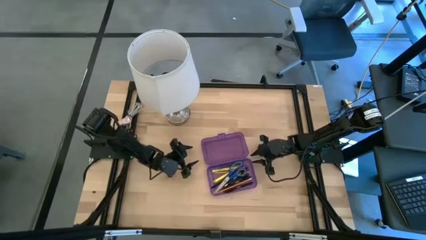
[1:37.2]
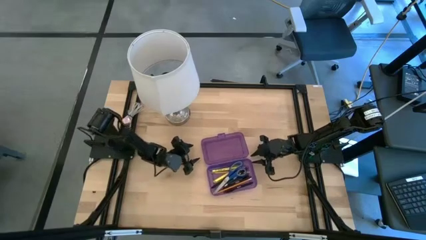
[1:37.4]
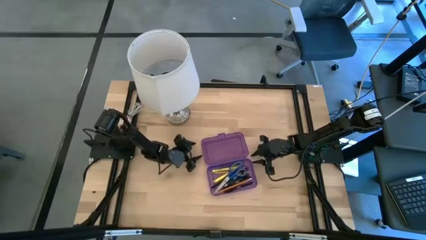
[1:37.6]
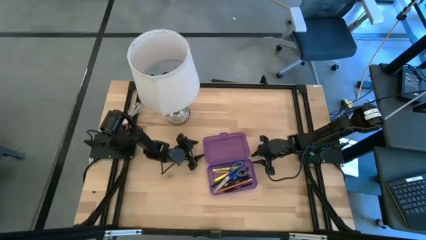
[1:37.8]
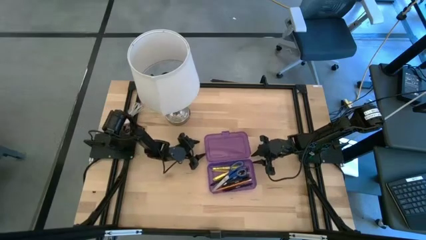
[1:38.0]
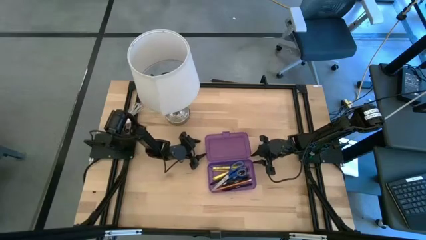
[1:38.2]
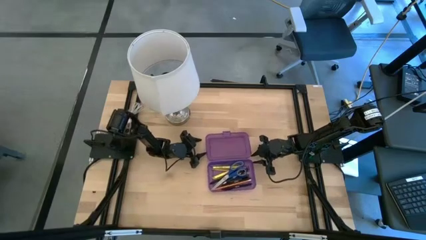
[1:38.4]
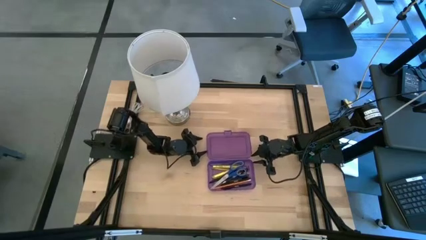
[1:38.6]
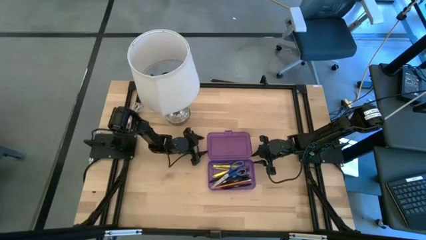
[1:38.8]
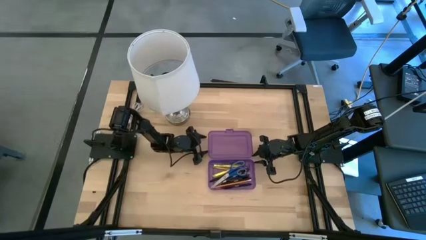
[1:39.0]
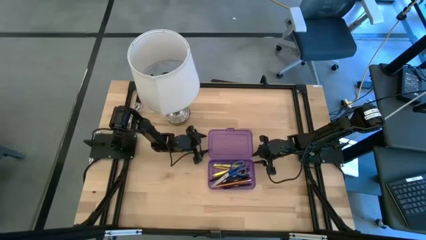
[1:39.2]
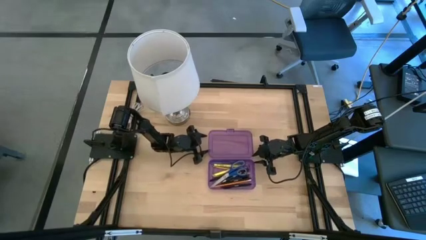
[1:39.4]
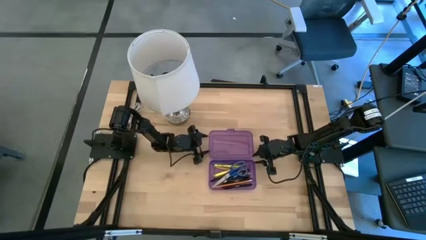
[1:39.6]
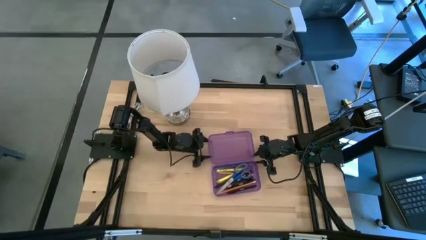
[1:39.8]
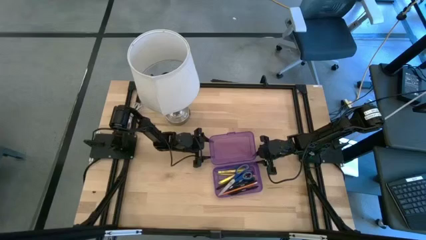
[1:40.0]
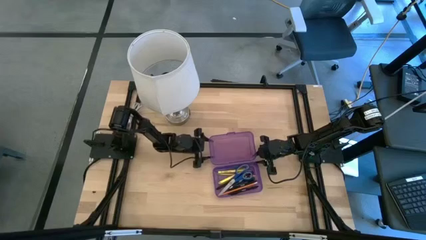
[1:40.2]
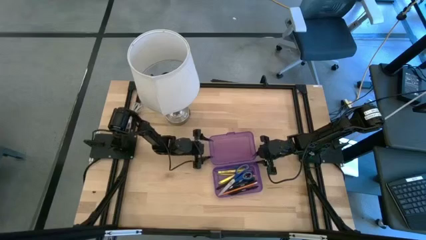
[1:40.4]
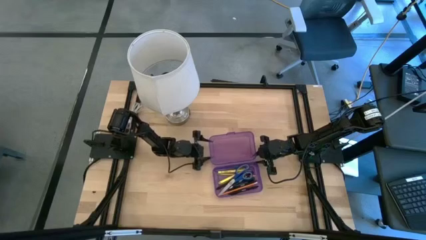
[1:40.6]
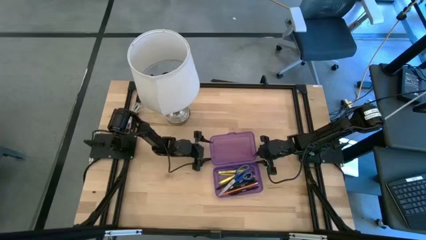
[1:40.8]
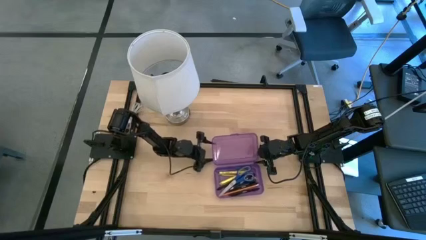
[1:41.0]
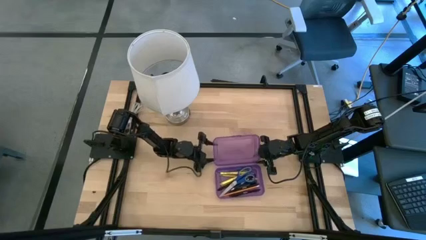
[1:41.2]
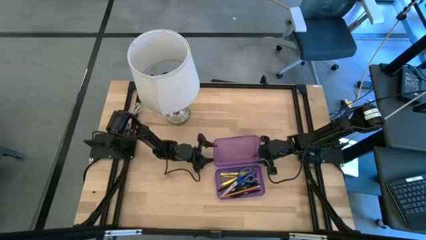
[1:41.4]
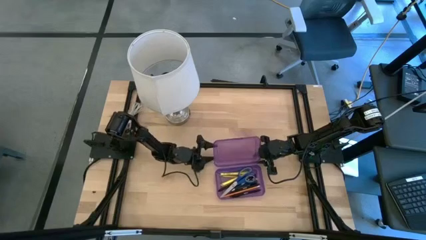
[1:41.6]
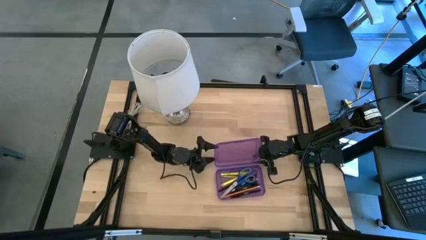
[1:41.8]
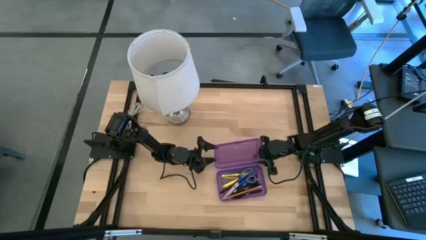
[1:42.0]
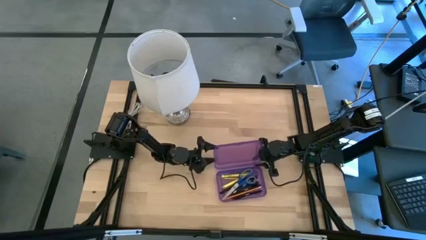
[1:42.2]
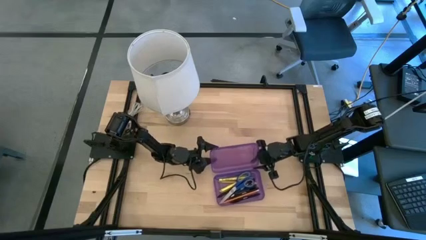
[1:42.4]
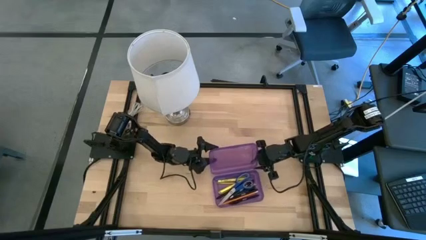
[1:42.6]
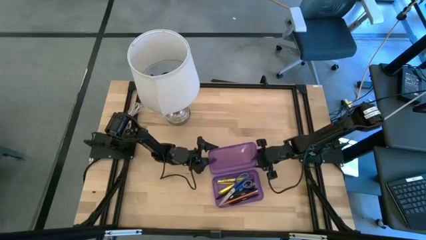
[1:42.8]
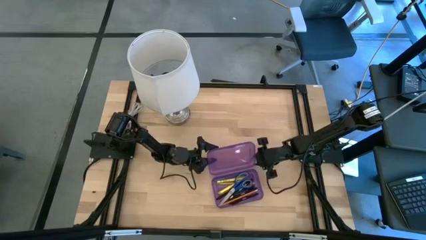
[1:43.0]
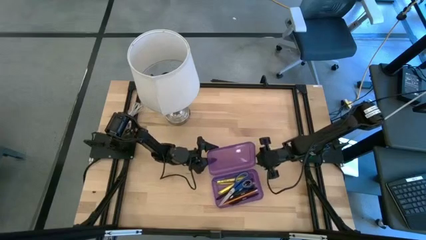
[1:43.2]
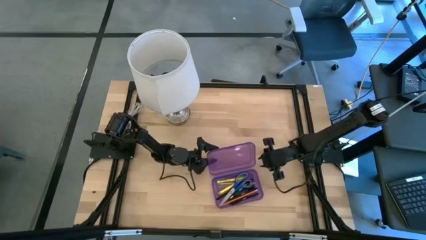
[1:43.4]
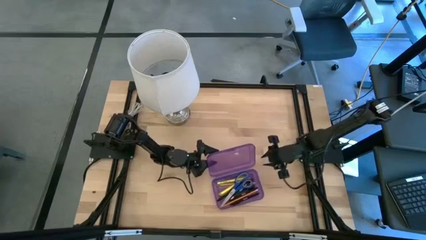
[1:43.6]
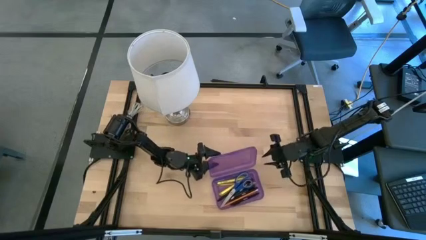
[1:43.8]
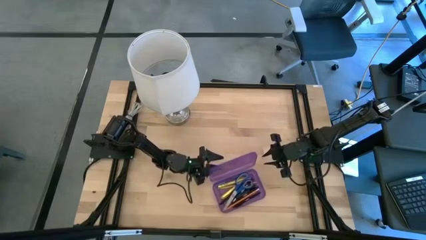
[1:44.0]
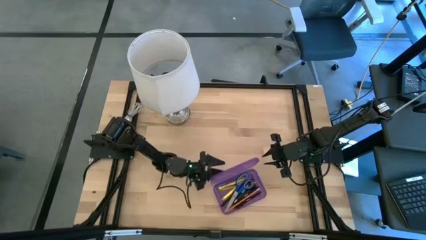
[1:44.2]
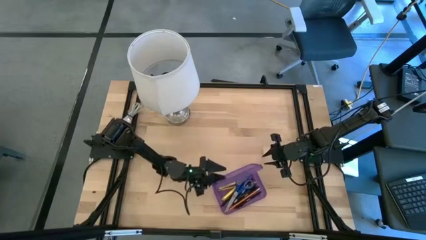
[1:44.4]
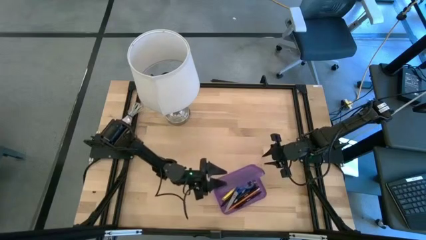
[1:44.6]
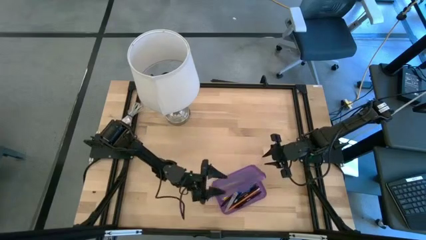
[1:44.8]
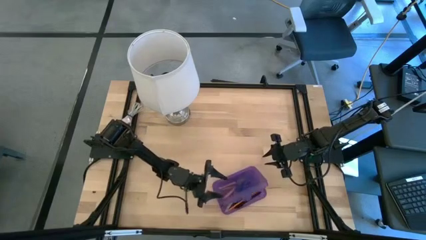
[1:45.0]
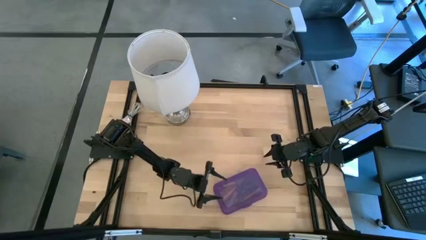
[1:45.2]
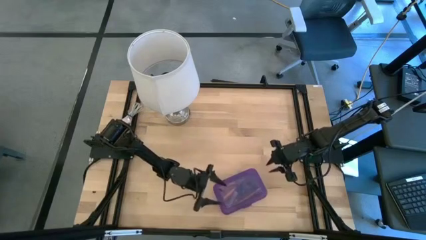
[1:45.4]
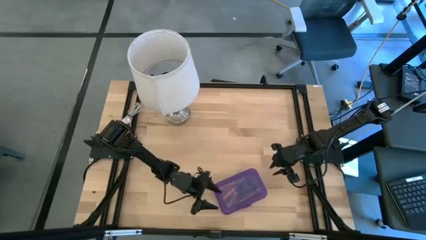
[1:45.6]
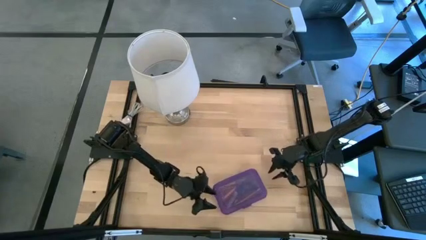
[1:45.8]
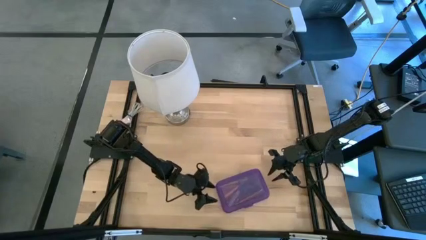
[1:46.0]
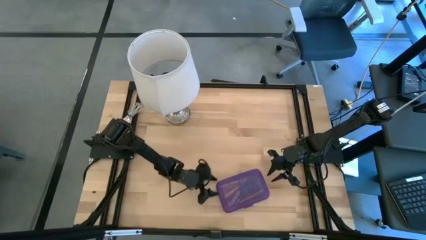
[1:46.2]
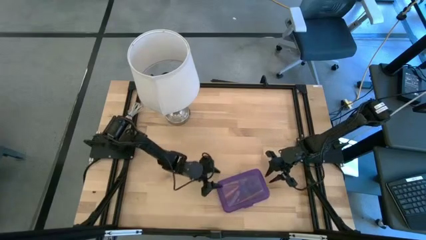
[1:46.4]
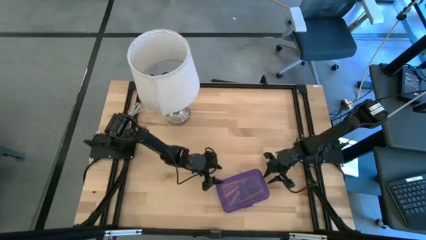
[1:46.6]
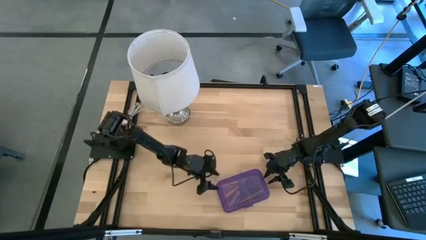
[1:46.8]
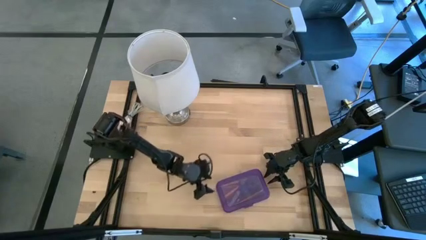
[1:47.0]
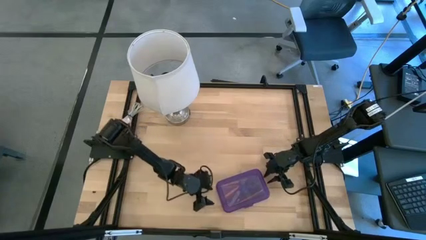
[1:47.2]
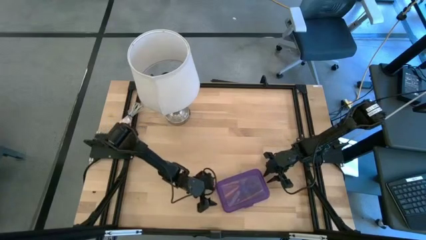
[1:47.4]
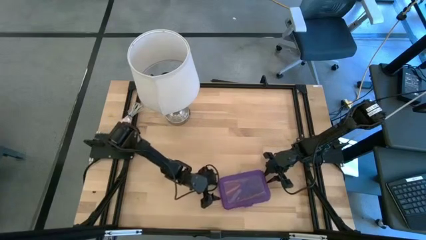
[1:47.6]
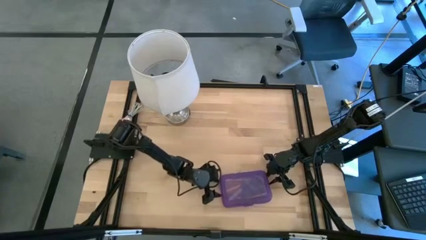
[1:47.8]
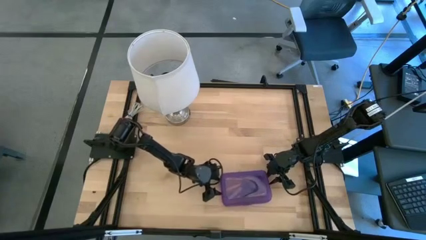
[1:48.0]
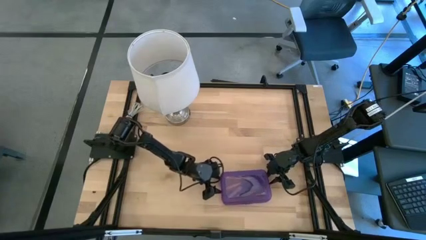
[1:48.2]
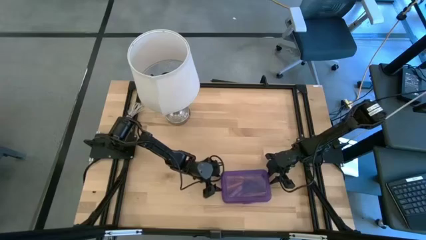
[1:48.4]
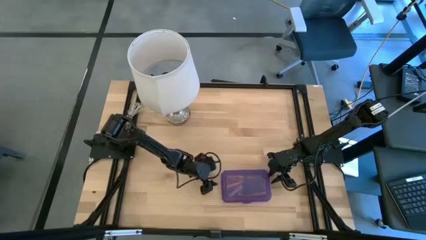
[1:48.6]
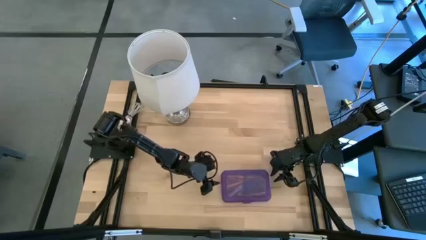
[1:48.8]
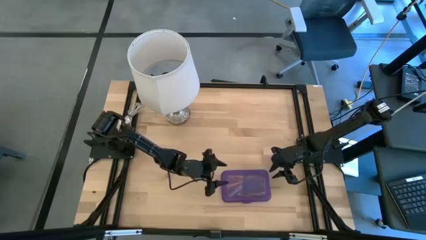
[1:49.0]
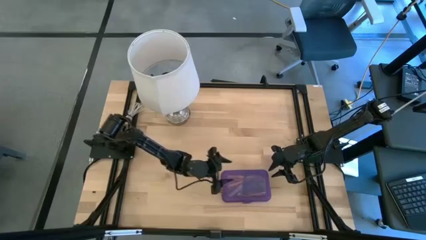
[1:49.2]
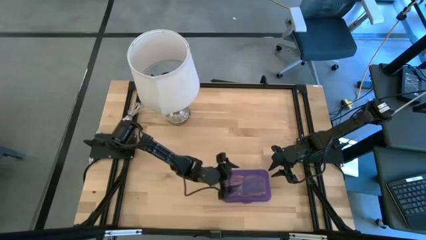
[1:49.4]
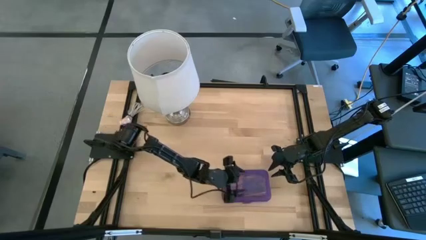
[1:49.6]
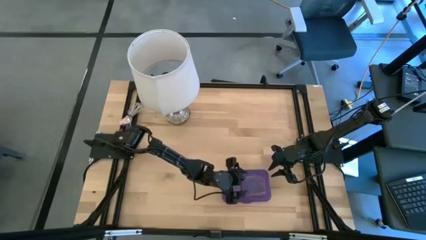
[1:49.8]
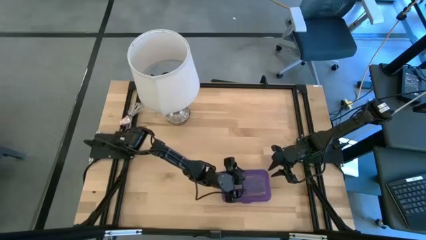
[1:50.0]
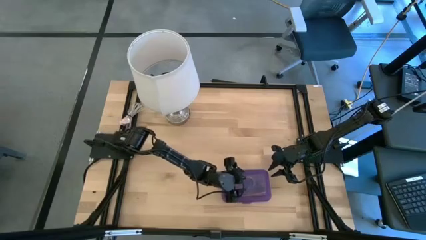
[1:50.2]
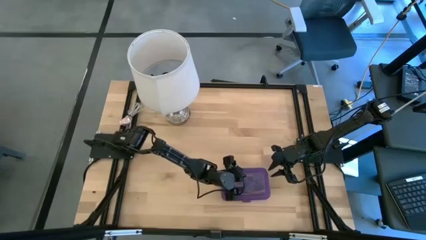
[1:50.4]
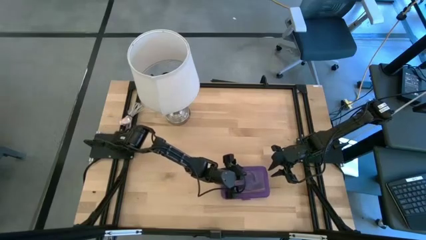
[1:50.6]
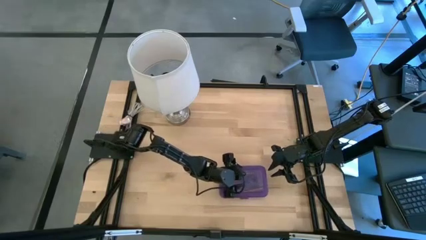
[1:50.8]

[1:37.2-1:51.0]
Task: Pick & place school supplies into a supply box
Close the purple supply box

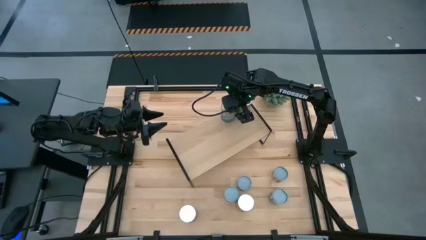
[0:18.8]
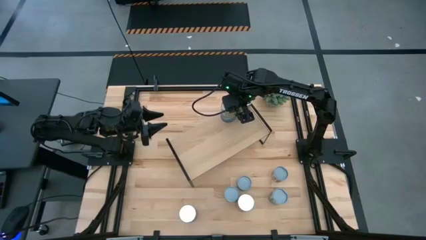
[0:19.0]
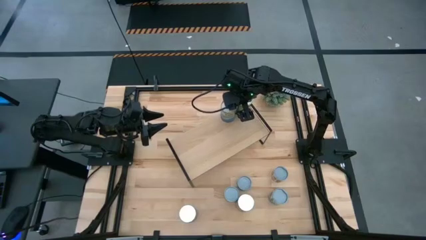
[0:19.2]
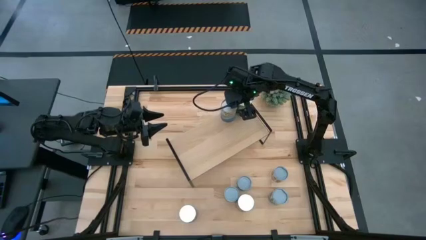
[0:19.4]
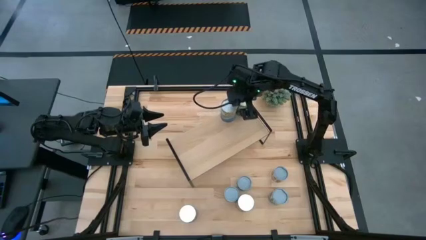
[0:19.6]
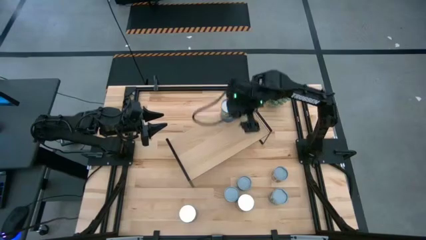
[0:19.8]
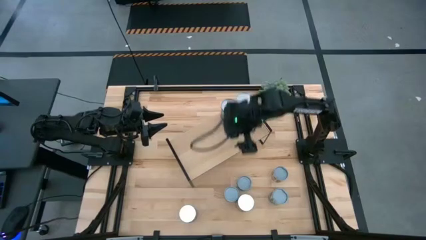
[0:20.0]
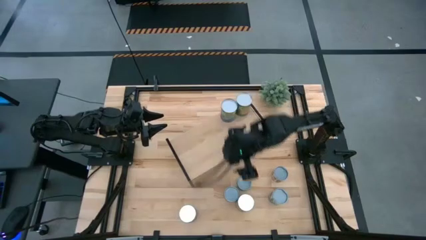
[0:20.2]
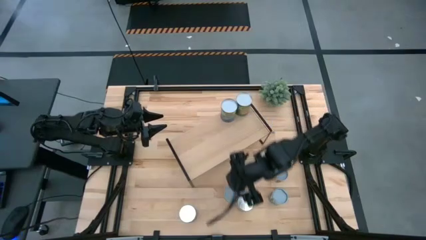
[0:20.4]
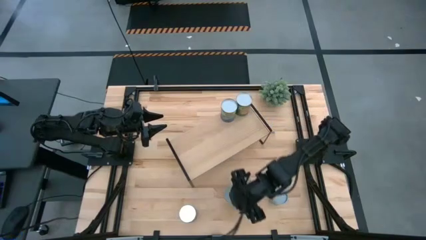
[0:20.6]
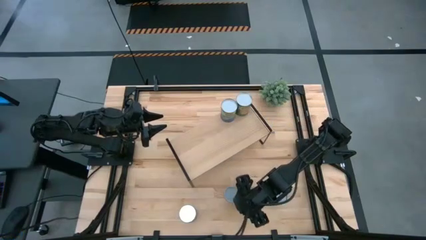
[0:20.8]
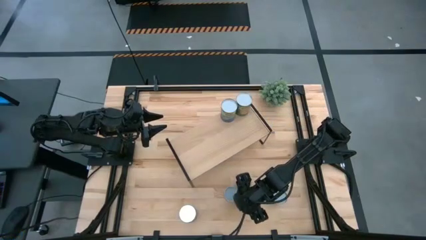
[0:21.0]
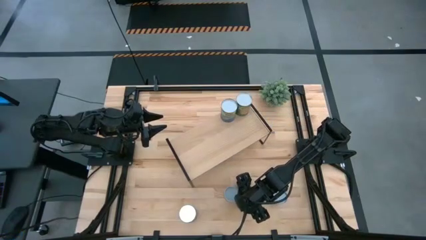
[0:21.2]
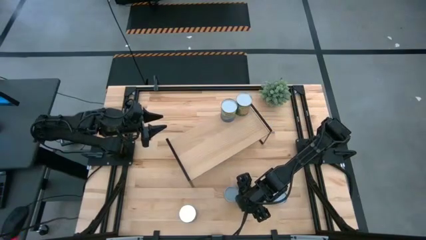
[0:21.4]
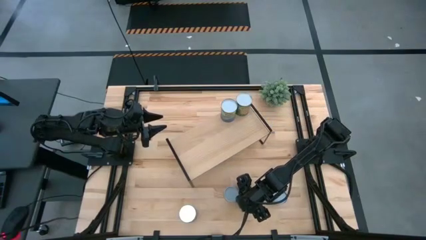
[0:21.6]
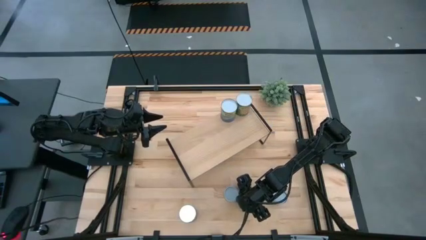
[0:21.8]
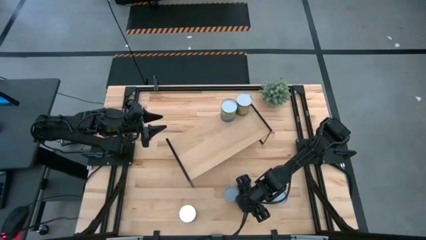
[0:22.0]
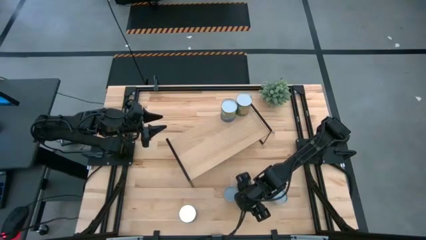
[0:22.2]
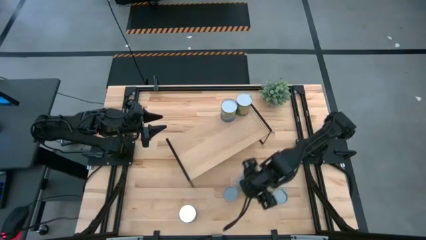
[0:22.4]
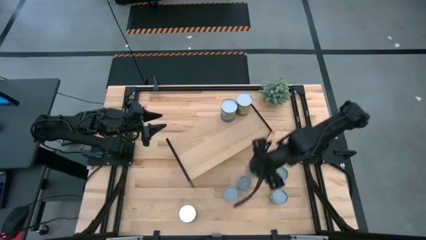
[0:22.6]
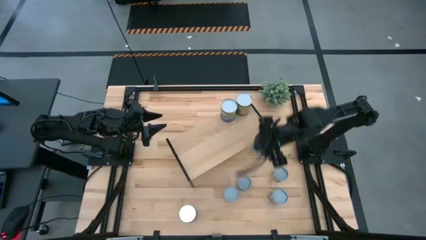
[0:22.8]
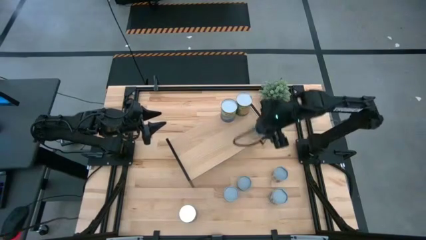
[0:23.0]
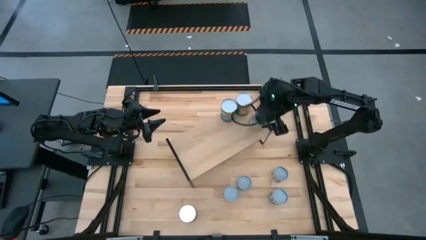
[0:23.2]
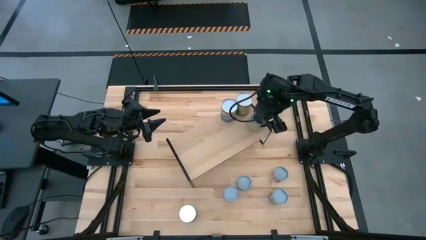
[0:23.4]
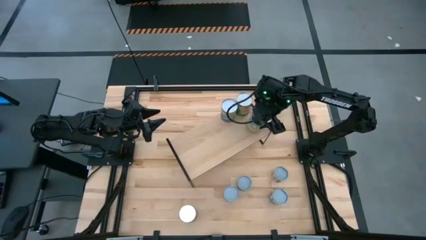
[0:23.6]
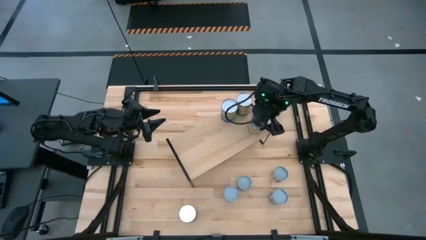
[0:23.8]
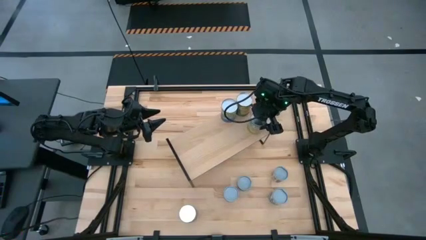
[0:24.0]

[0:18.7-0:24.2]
Task: Pick and place cans onto a shelf
Put the big canned carrots on the shelf aligned with the other big canned oranges
